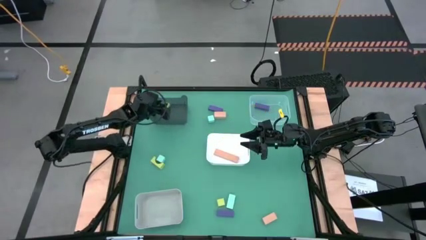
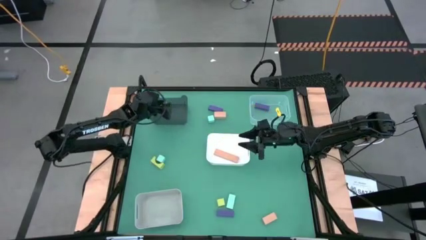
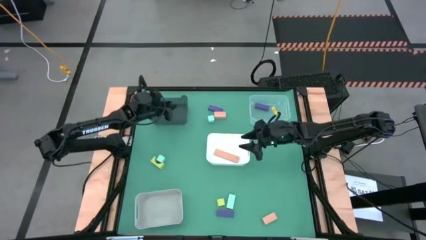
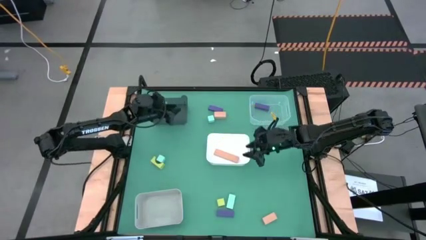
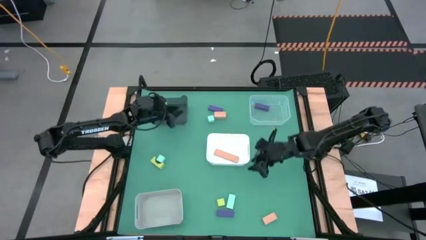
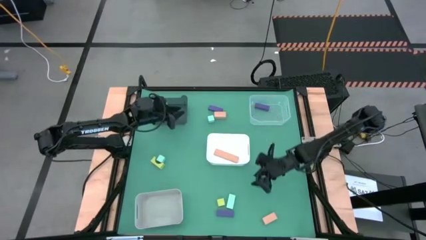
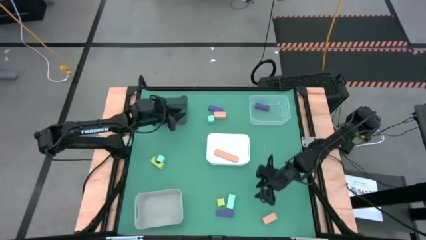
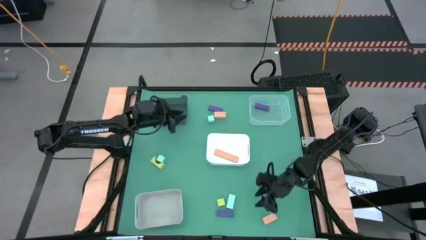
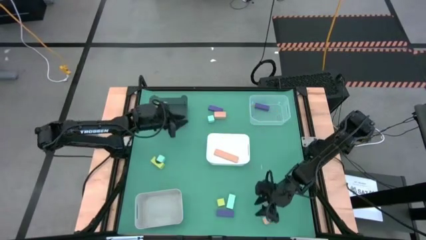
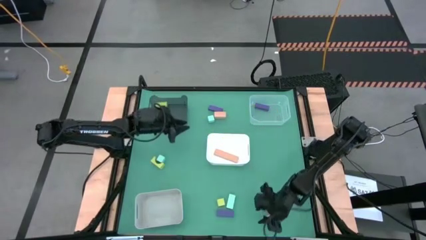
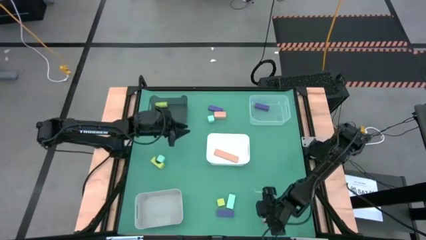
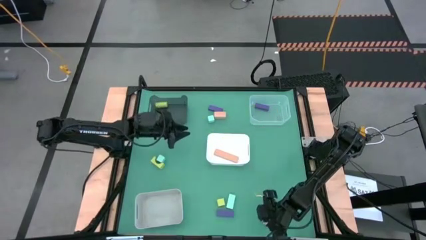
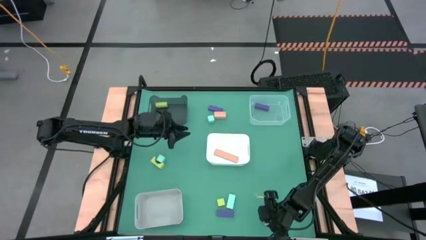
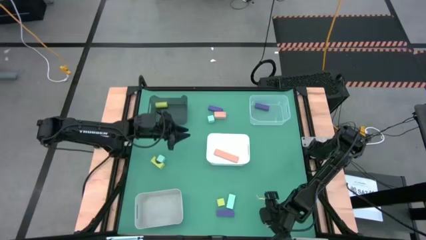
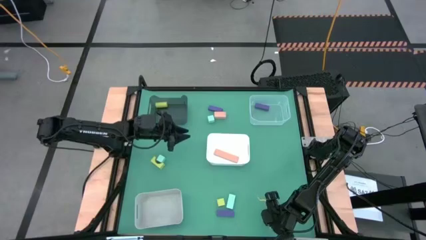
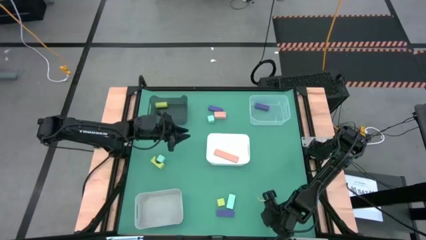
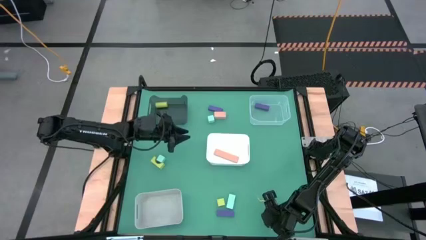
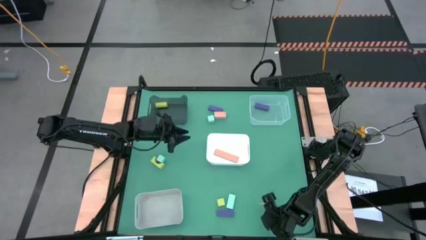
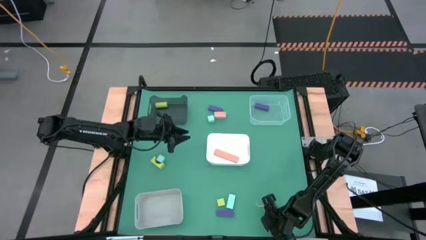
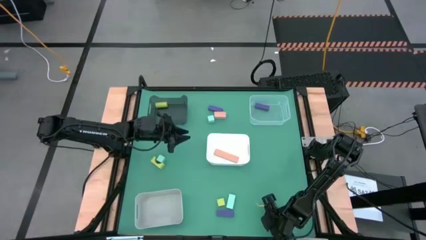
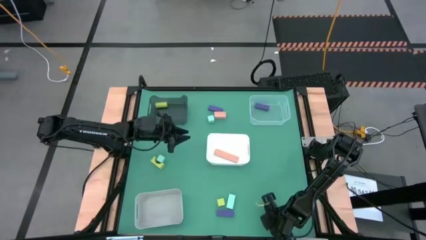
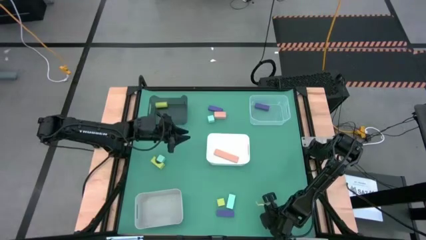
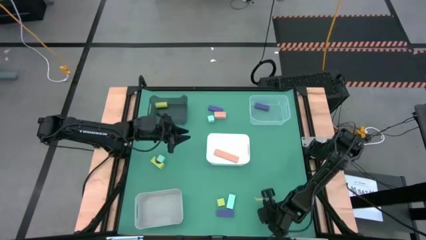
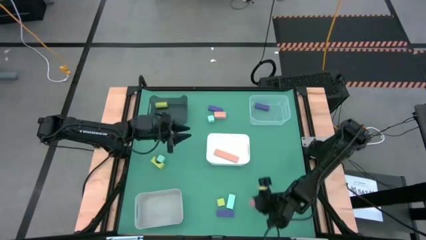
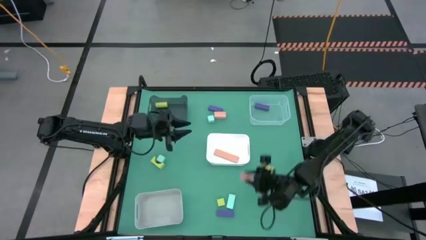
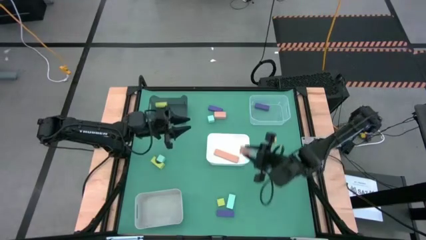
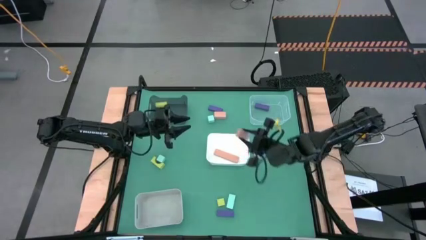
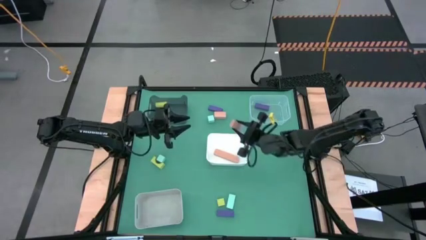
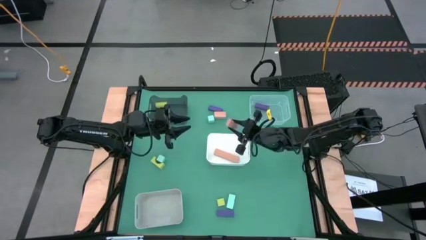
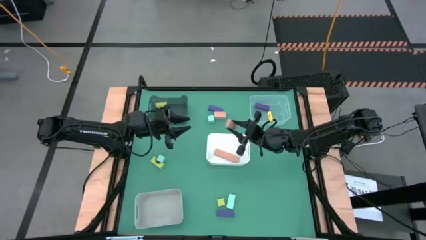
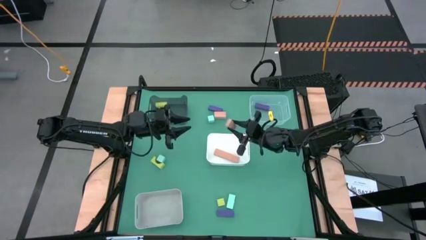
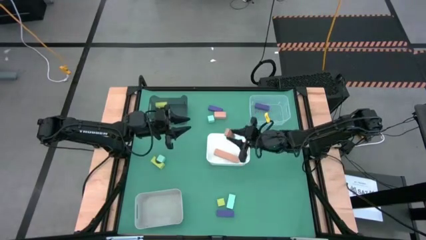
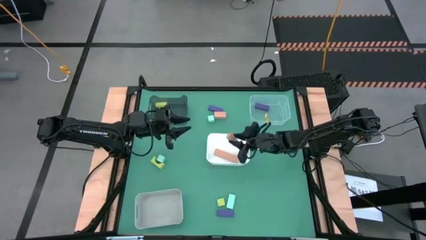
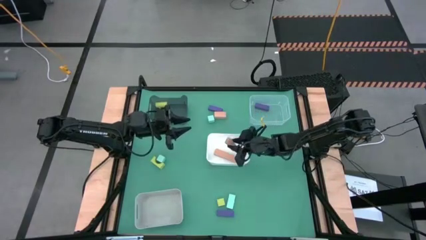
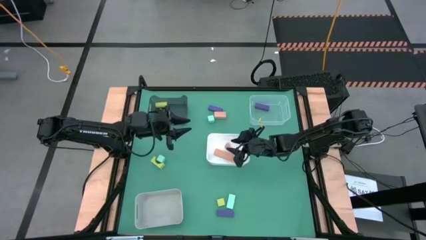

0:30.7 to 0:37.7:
Task: Sort & place blocks by color
Put the bottom orange block into the white bin

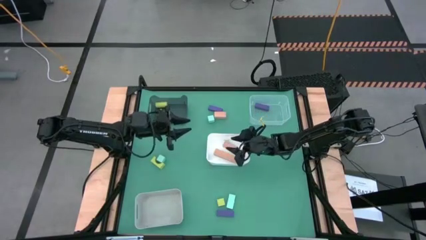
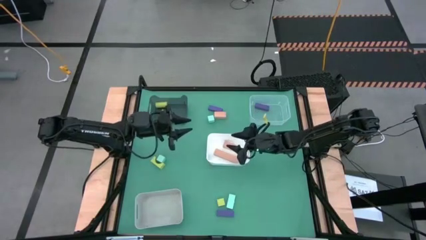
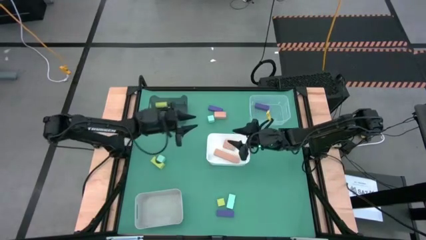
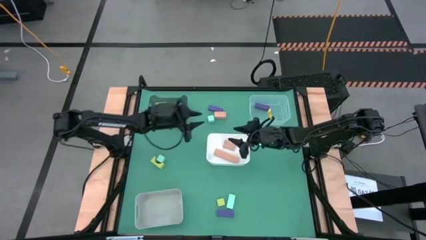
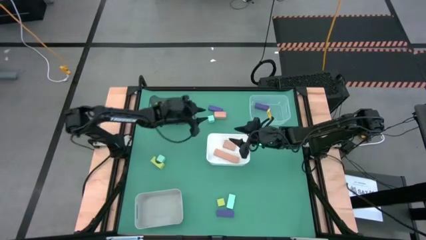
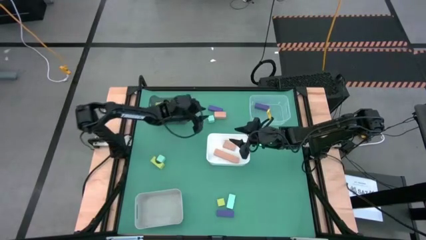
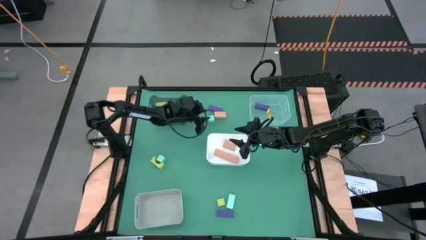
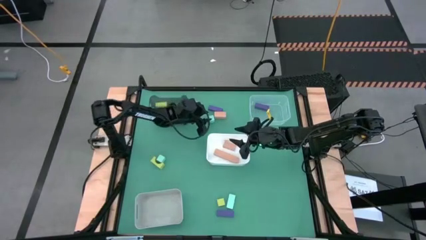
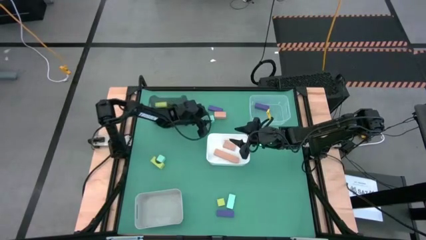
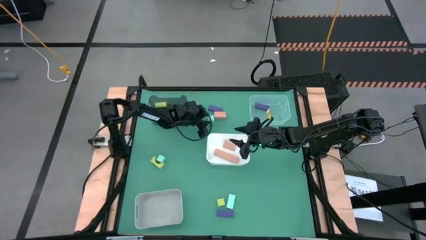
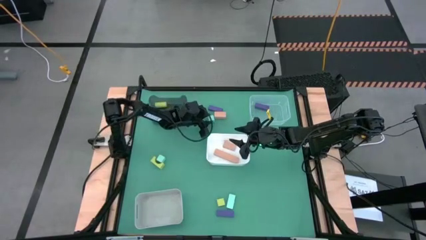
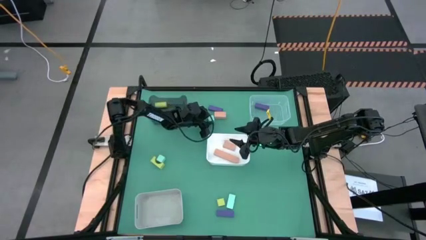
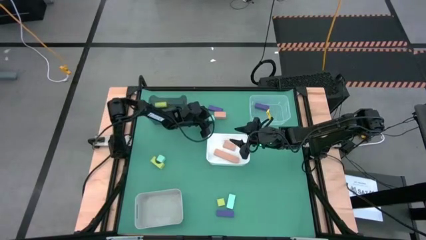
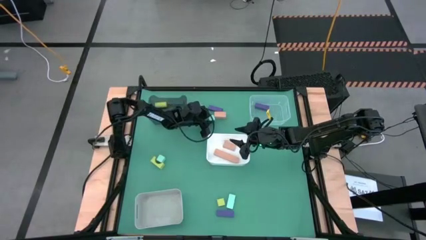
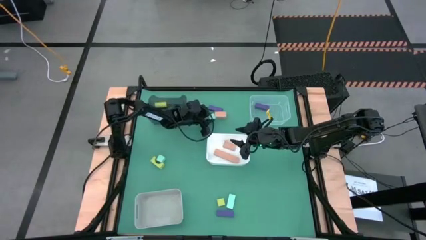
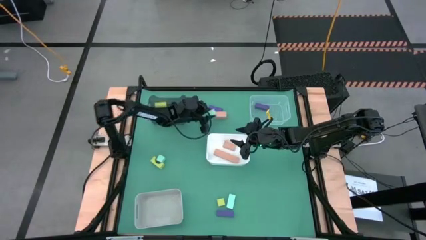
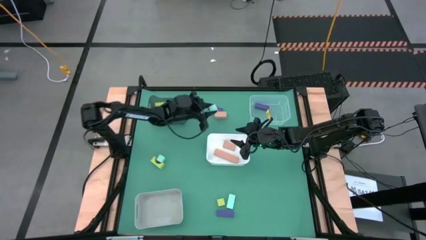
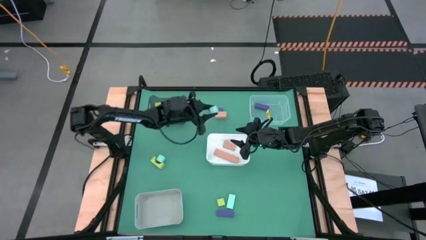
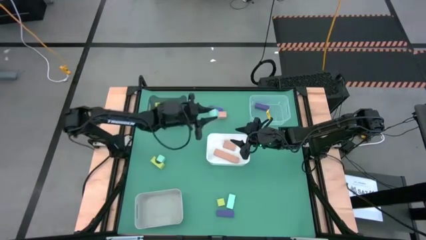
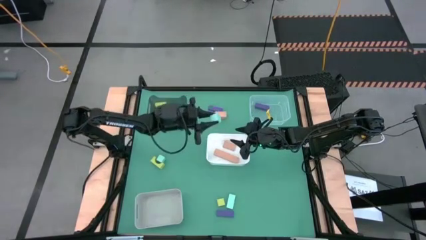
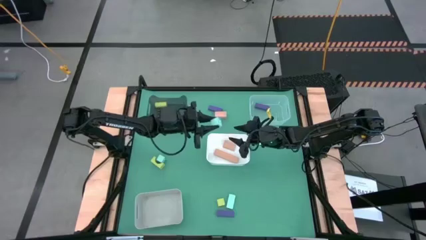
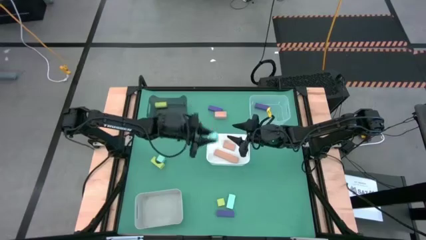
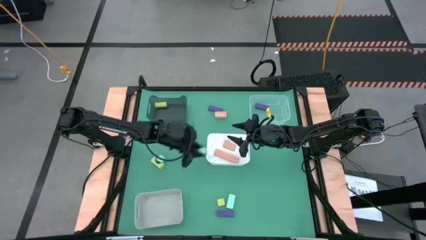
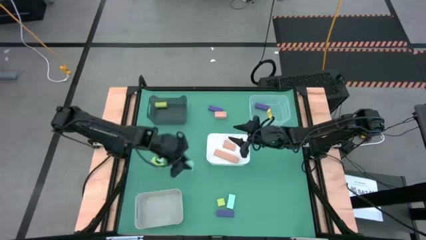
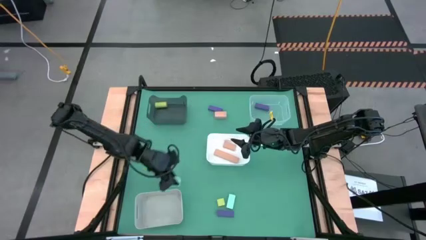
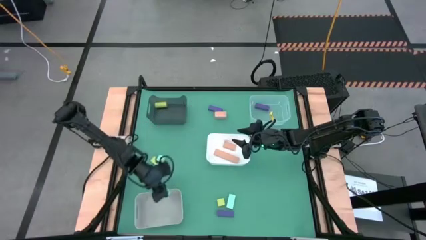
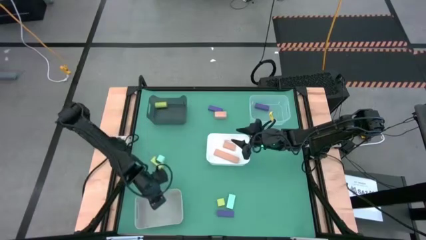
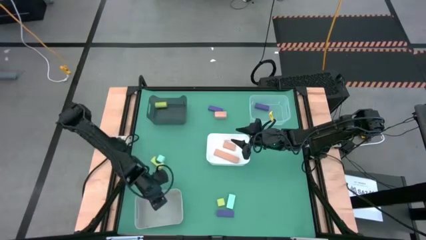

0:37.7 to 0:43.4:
Put the top blue block into the gray bin

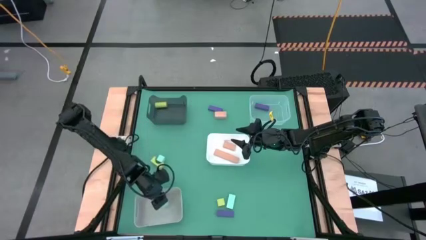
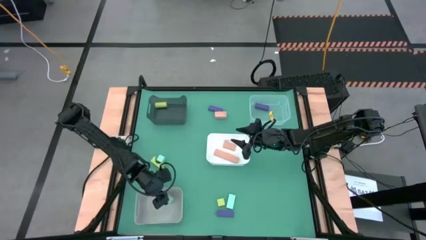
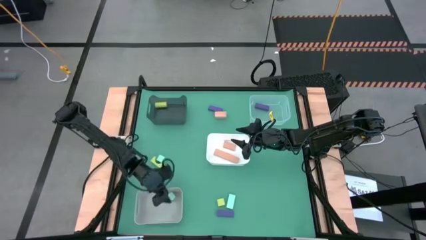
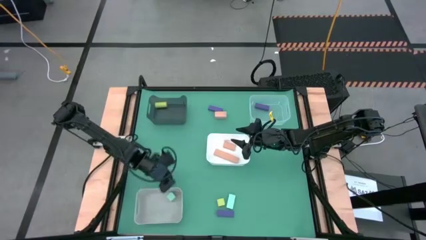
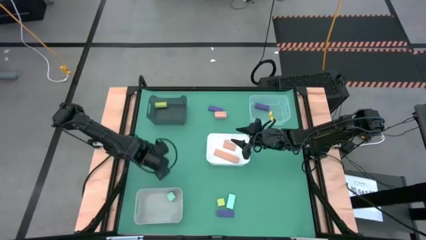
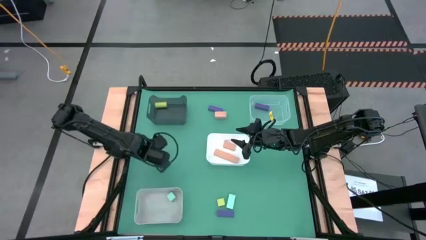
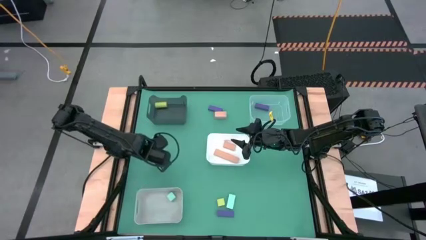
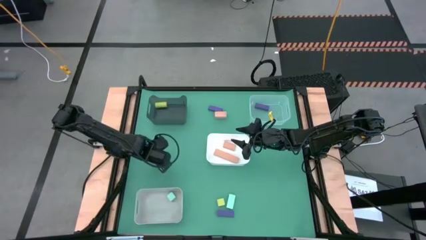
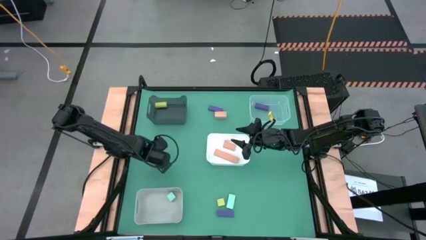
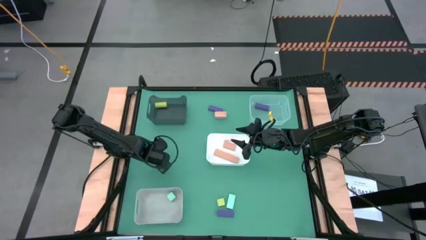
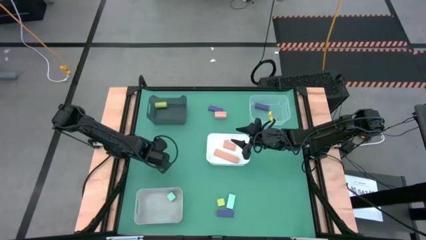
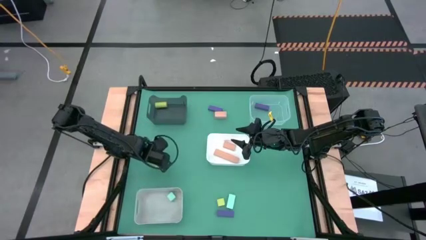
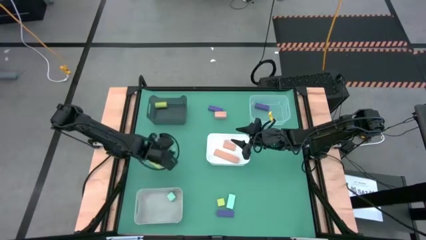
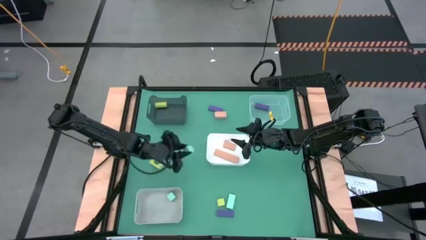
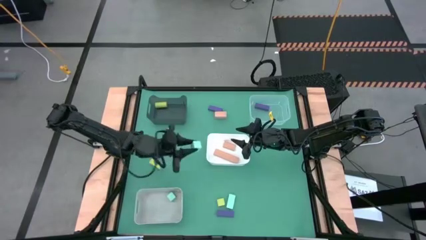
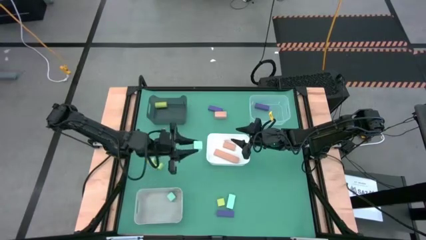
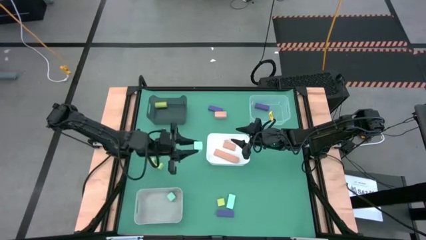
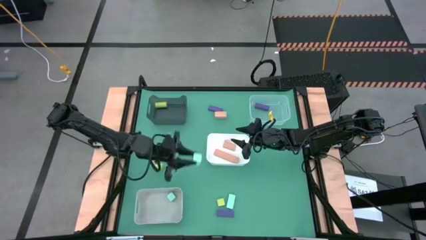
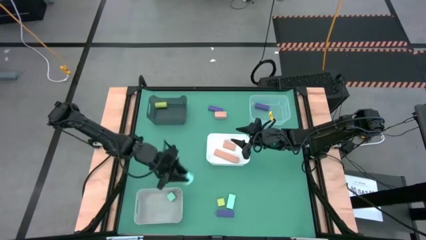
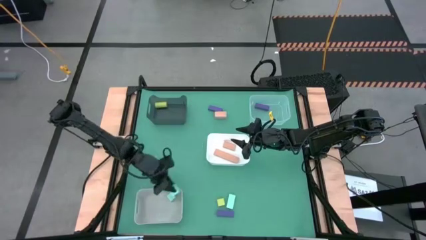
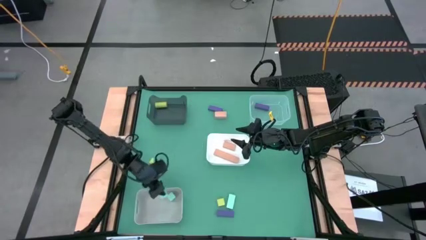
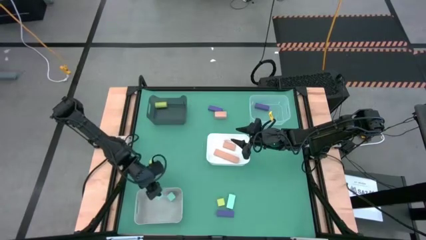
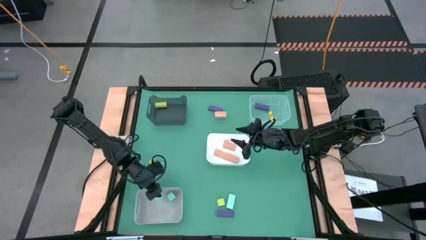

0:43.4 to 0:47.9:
Put the left blue block into the gray bin
